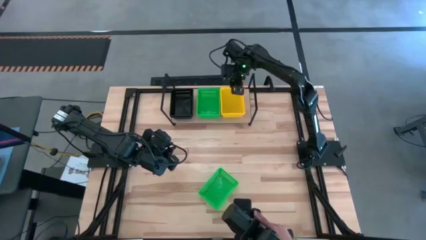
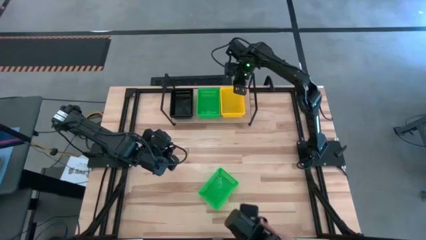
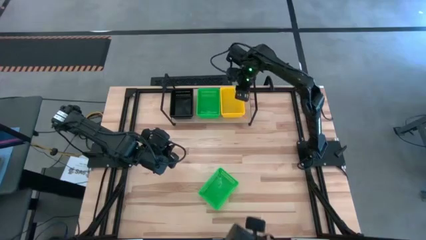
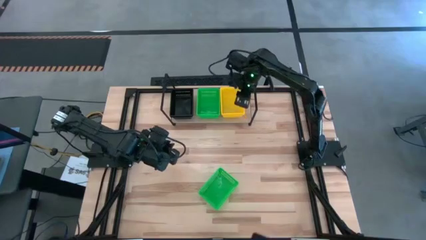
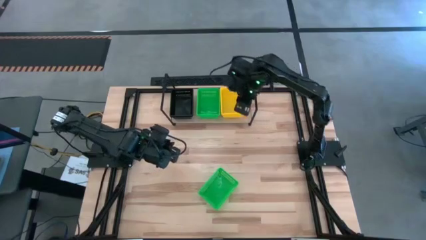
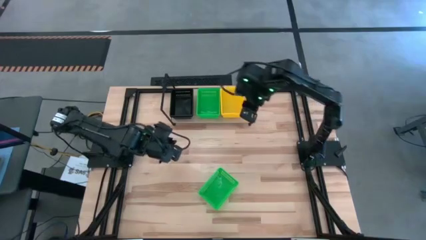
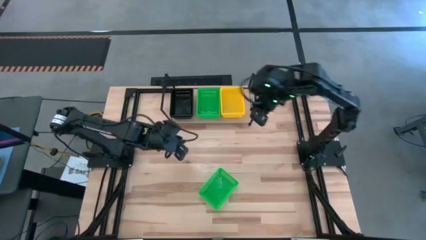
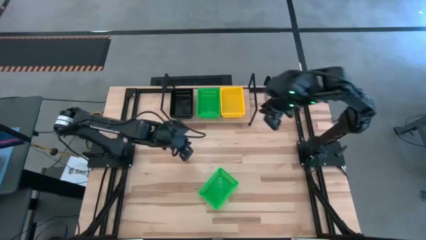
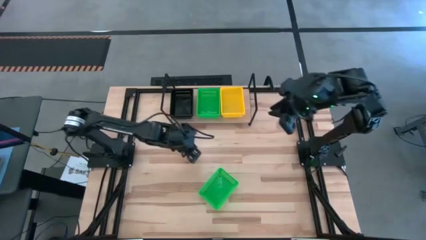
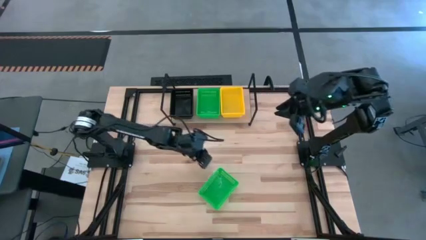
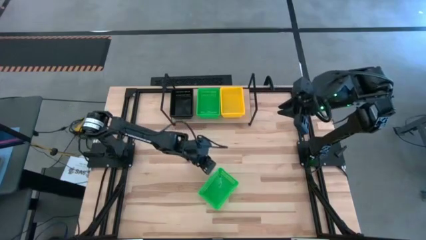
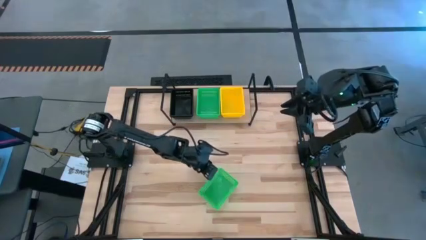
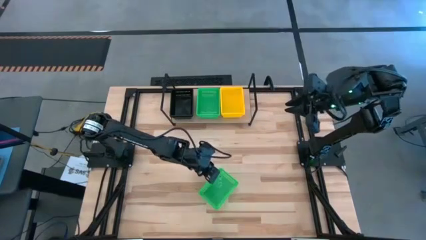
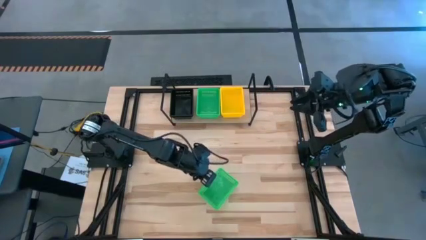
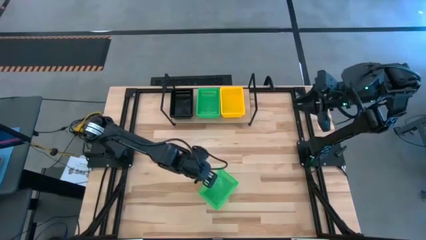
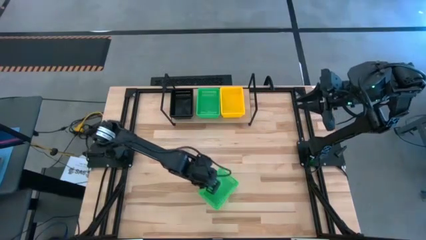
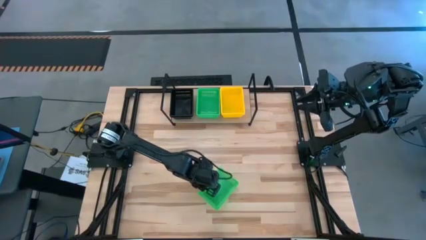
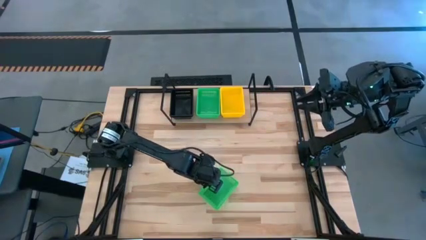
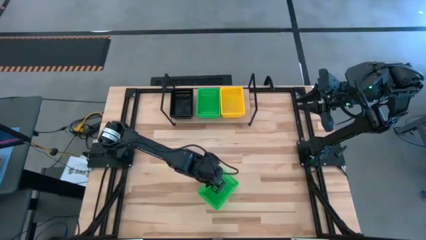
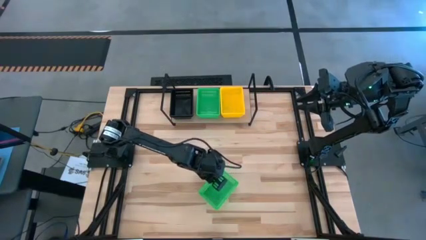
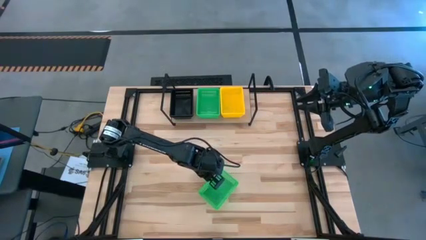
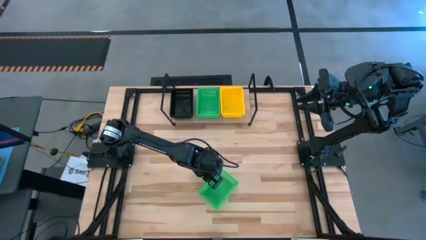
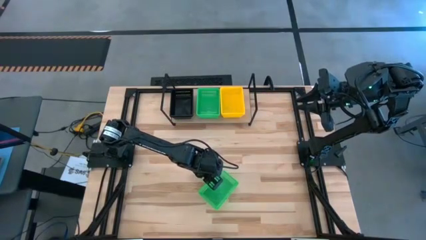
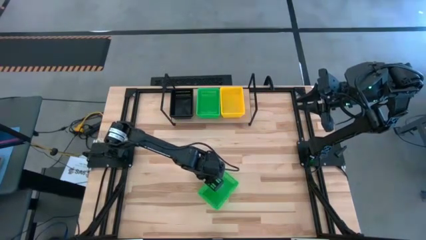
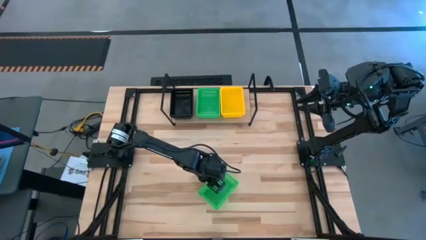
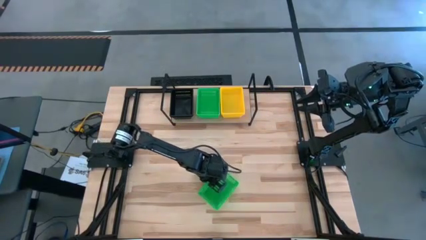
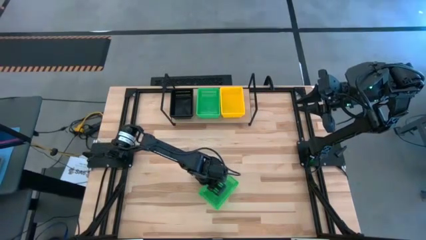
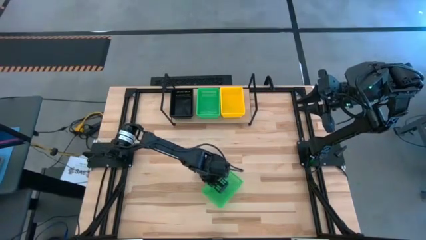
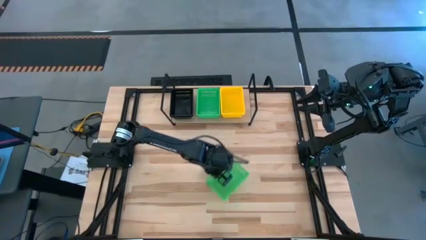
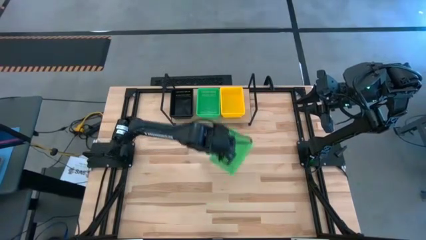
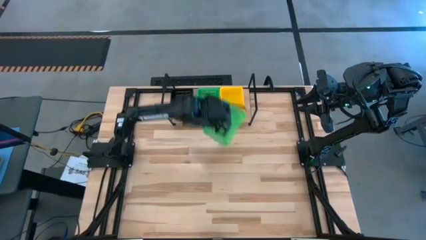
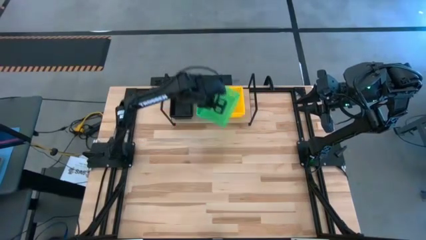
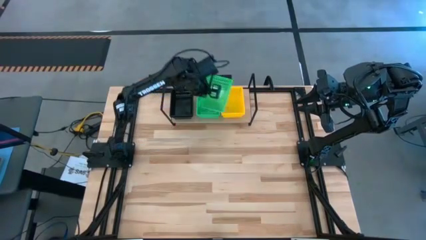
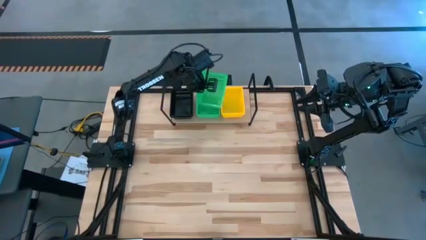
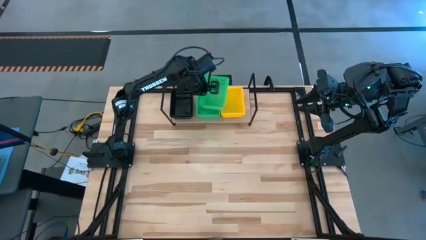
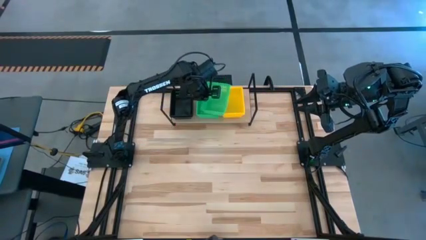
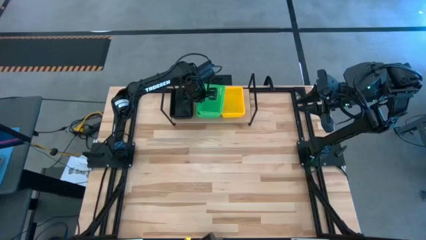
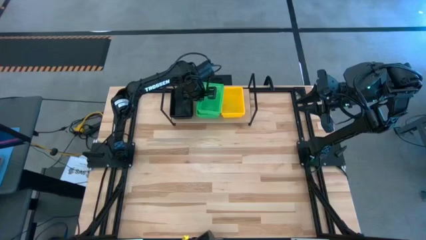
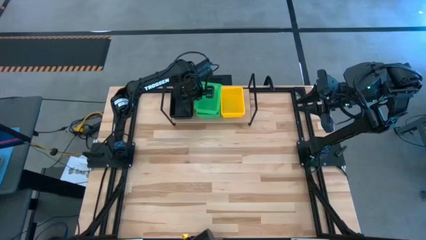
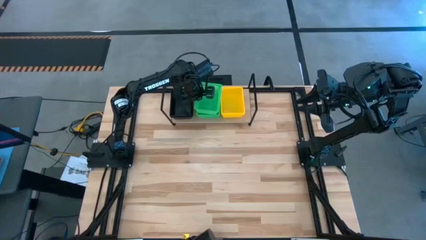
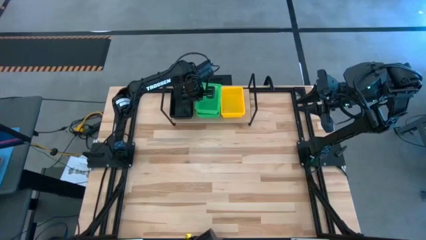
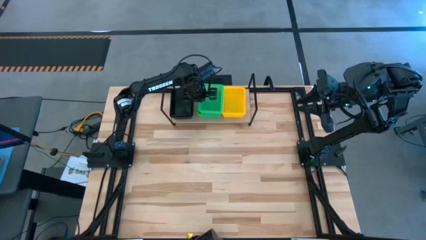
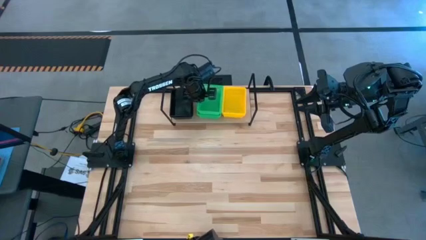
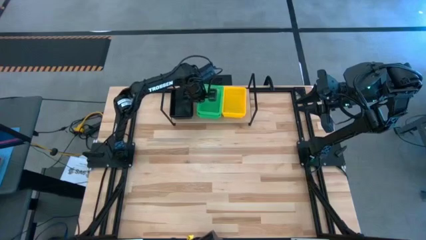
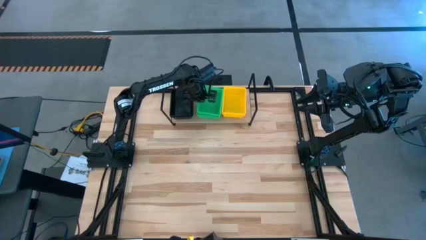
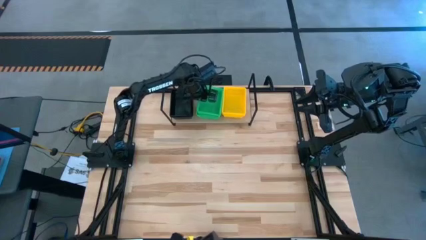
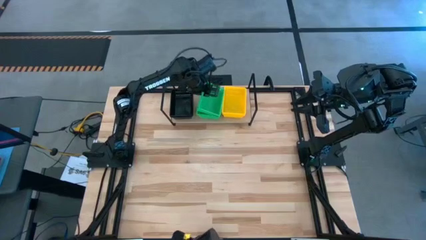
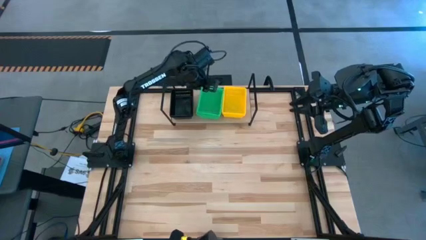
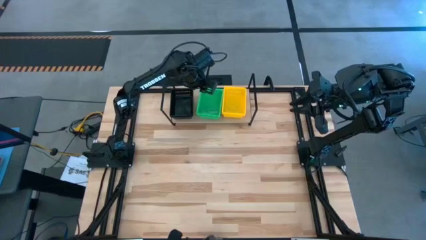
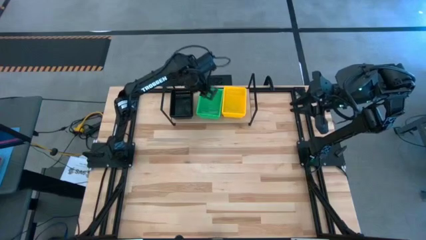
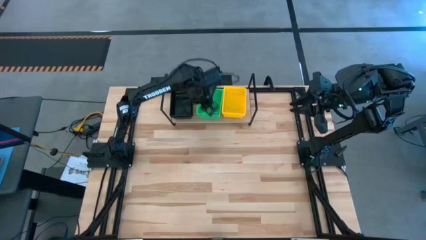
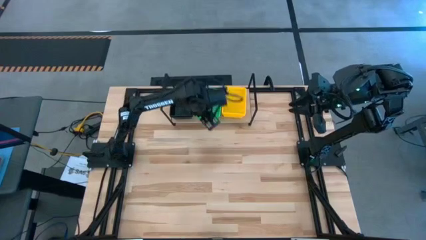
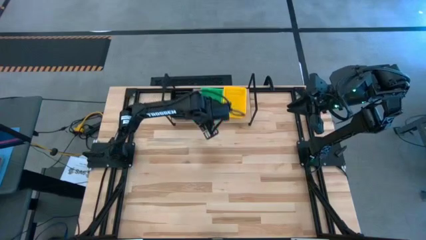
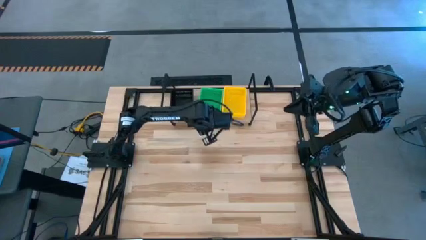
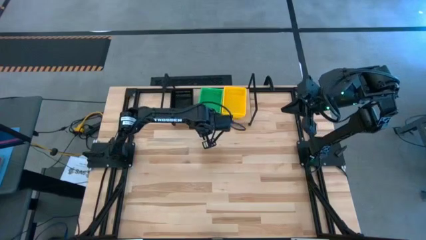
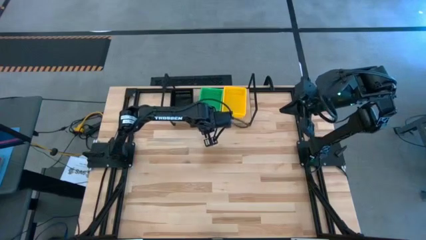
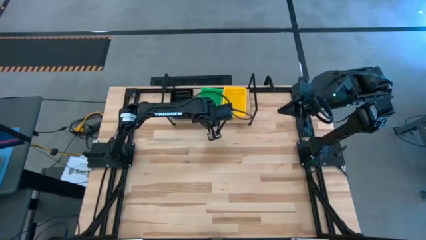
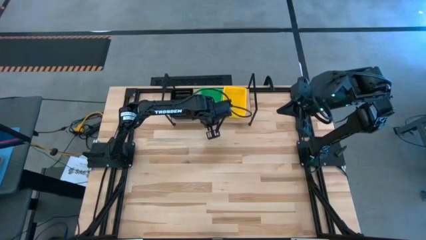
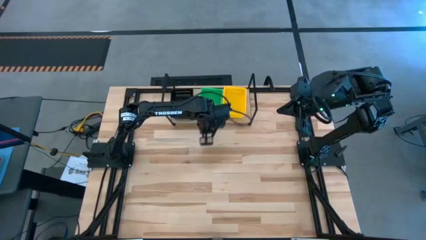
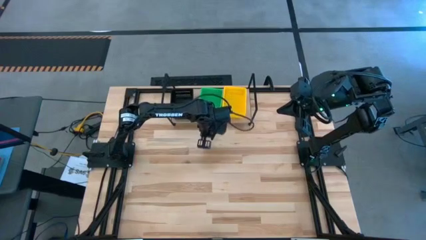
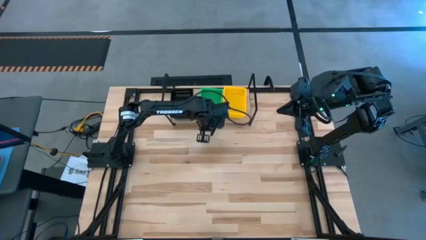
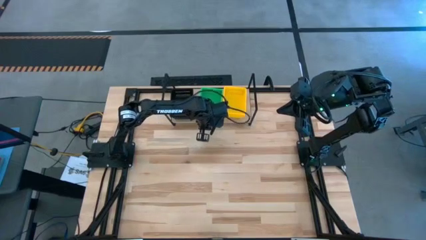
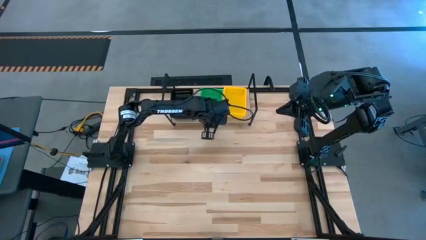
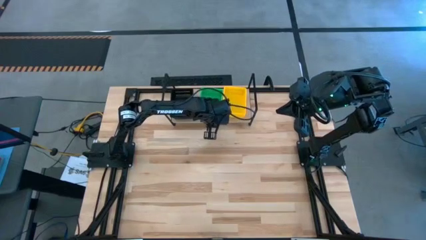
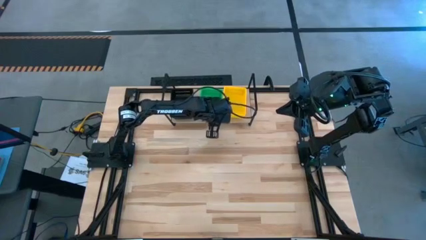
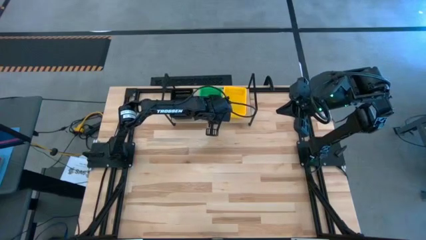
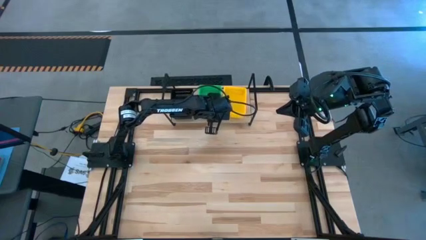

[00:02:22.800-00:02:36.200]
Task: Stack baskets on shelf by color
Stack the green bin on top of the green bin on the shelf

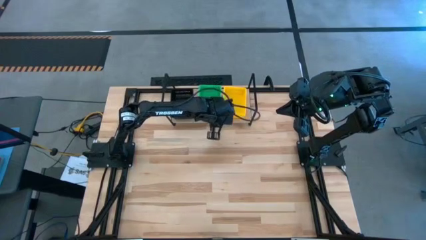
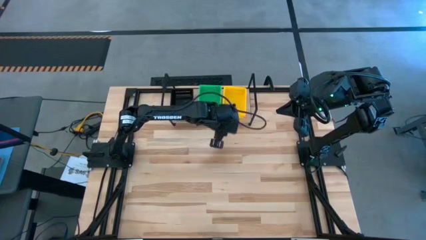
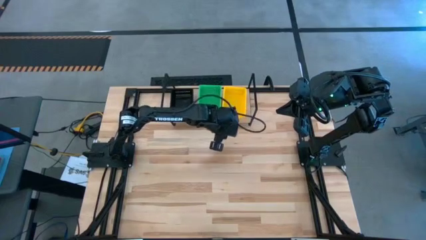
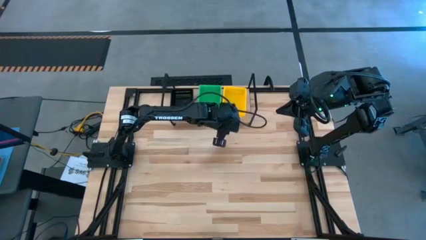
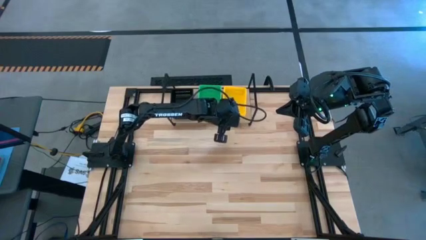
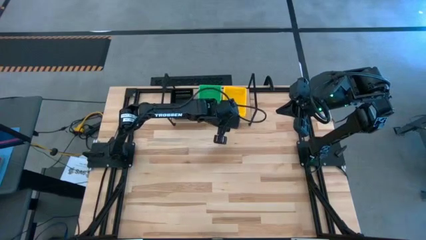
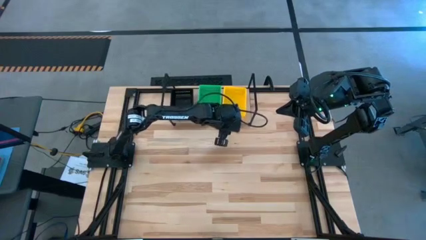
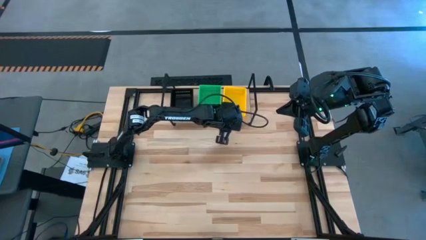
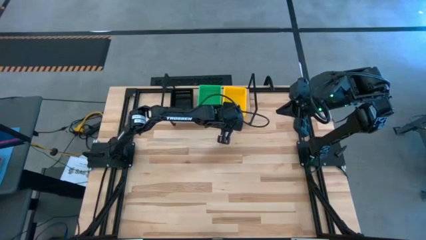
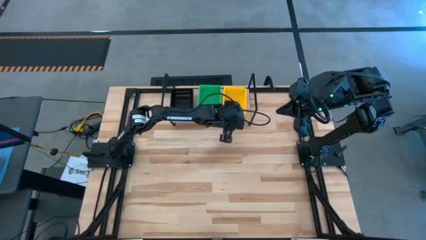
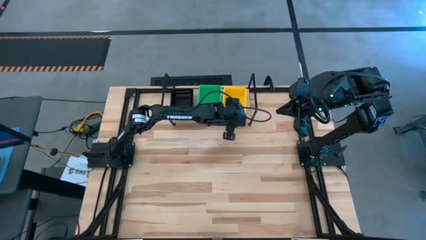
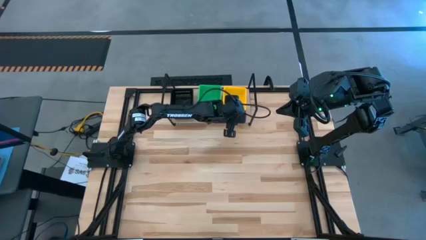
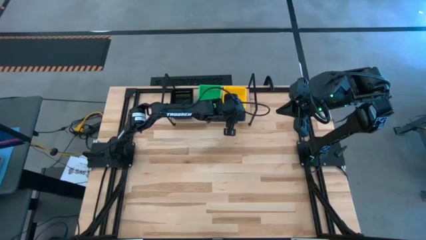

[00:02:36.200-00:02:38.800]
Adjust the stacked yellow bins on the shelf
